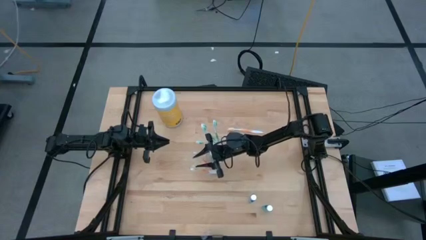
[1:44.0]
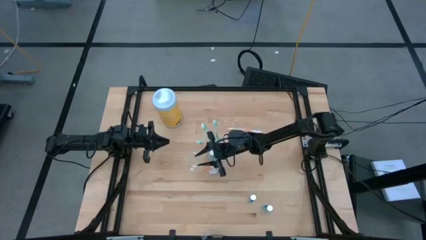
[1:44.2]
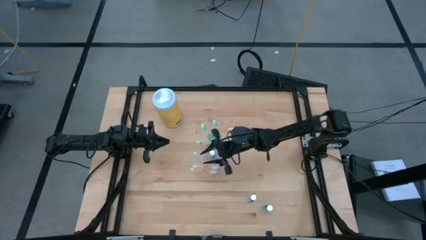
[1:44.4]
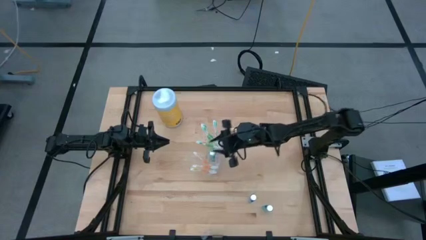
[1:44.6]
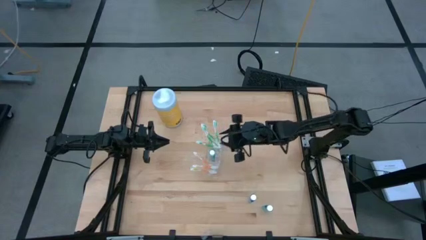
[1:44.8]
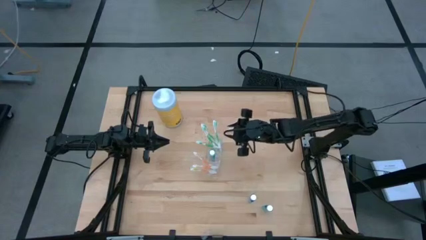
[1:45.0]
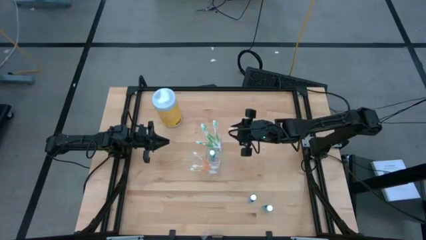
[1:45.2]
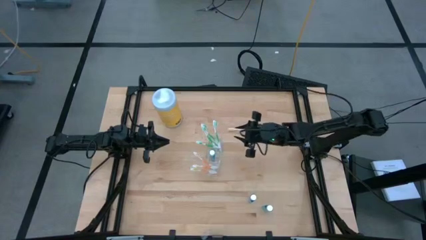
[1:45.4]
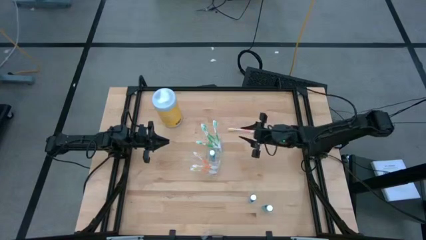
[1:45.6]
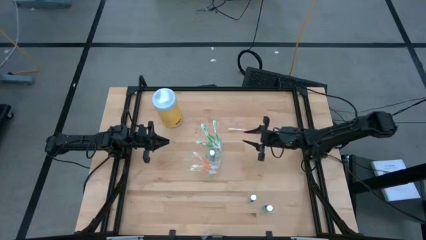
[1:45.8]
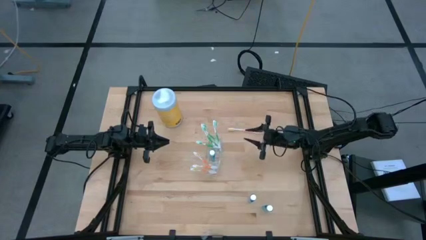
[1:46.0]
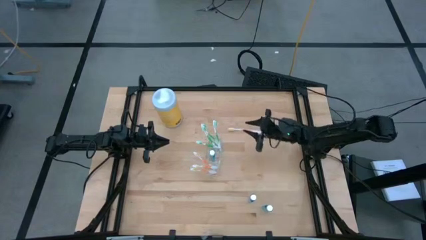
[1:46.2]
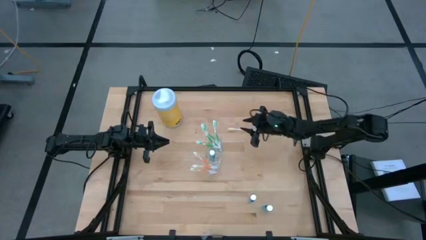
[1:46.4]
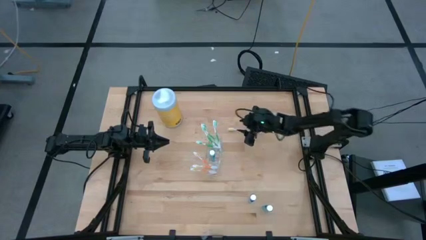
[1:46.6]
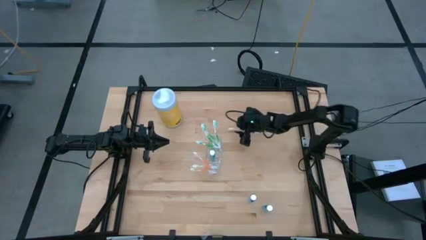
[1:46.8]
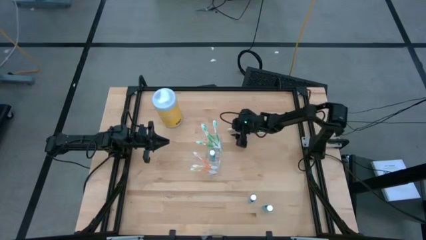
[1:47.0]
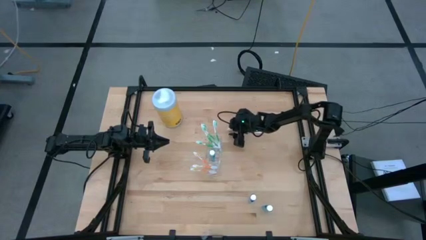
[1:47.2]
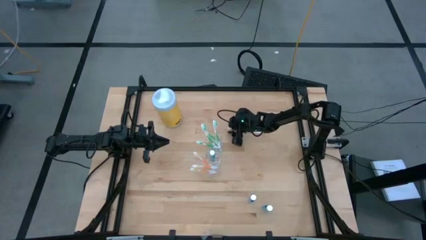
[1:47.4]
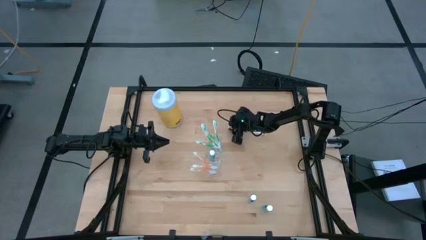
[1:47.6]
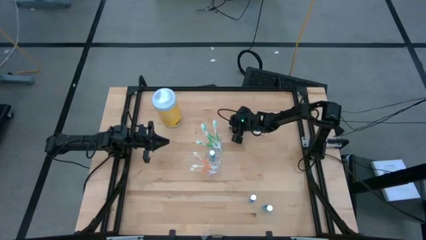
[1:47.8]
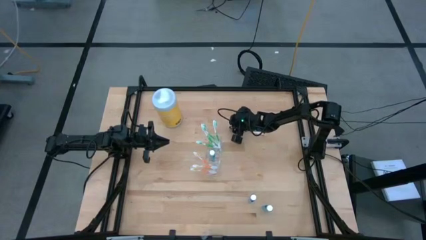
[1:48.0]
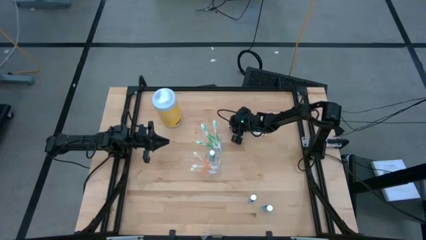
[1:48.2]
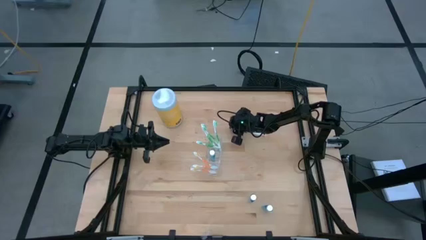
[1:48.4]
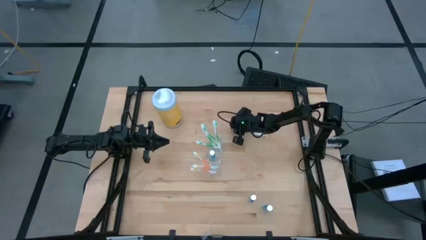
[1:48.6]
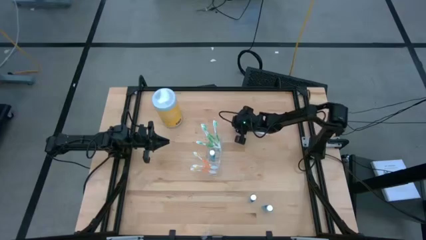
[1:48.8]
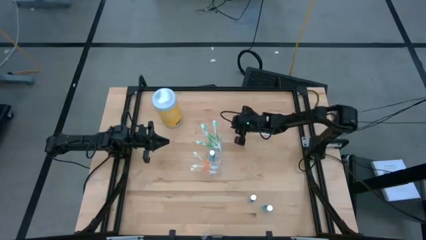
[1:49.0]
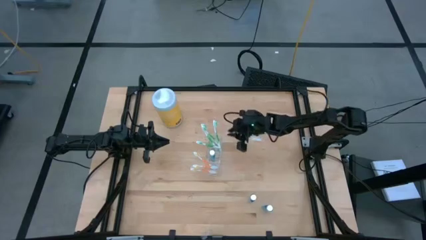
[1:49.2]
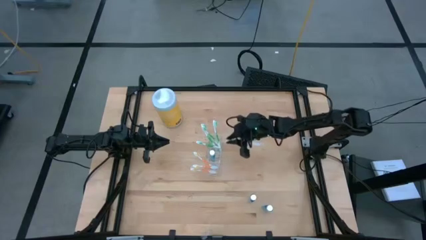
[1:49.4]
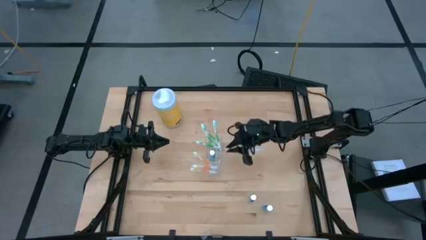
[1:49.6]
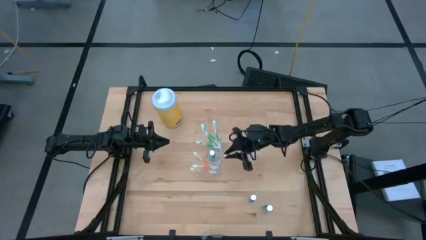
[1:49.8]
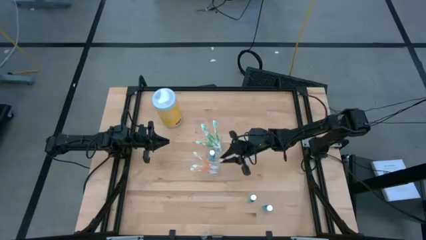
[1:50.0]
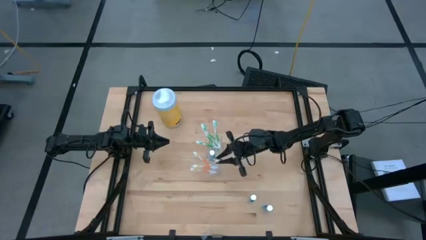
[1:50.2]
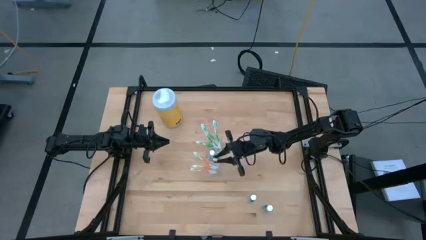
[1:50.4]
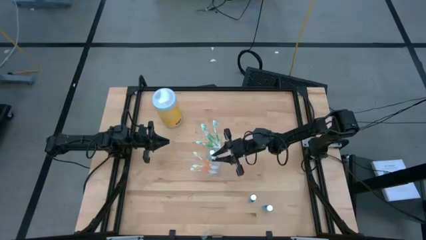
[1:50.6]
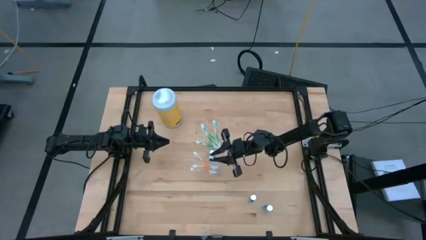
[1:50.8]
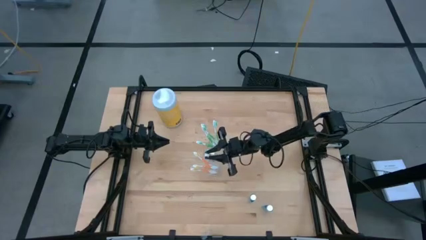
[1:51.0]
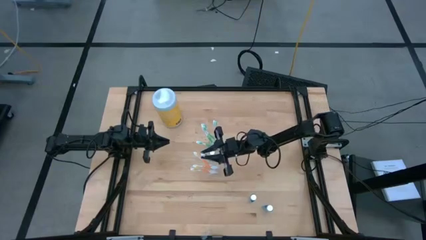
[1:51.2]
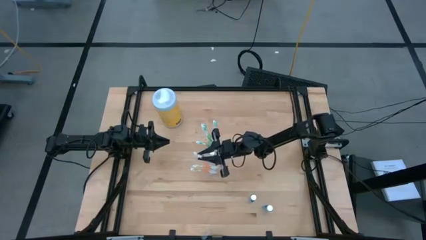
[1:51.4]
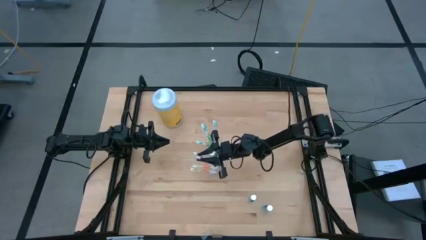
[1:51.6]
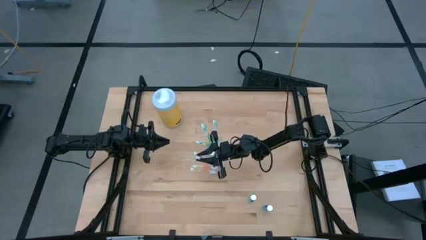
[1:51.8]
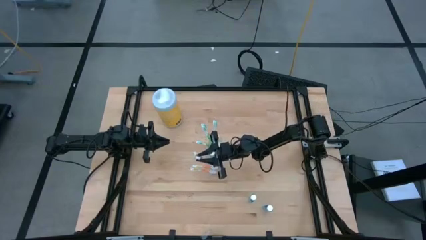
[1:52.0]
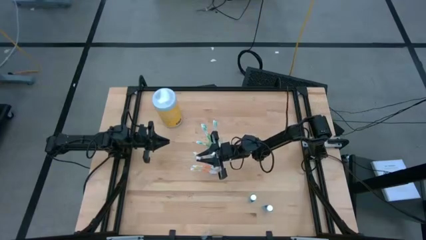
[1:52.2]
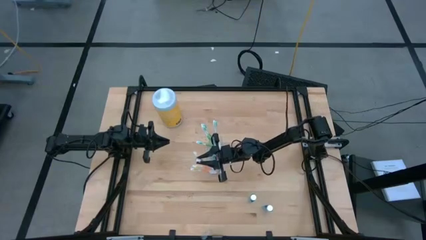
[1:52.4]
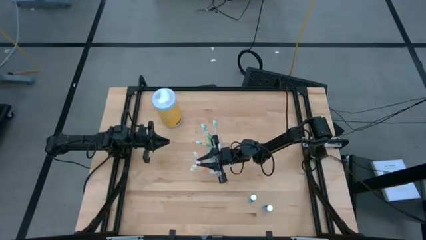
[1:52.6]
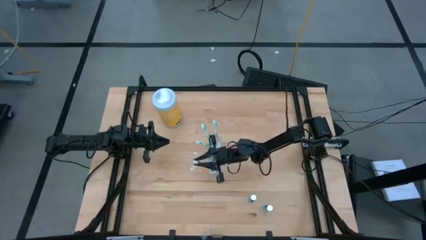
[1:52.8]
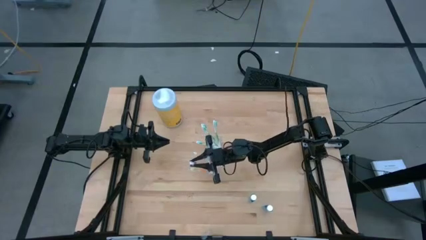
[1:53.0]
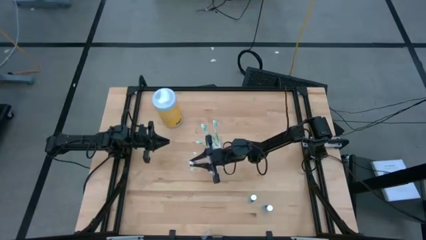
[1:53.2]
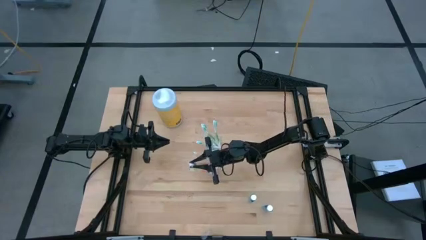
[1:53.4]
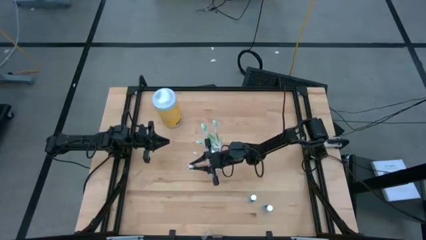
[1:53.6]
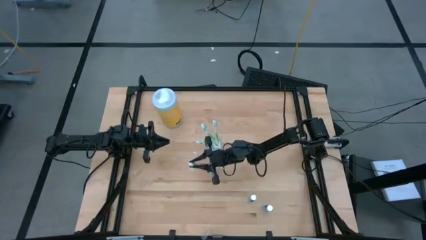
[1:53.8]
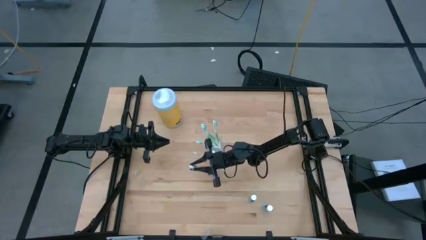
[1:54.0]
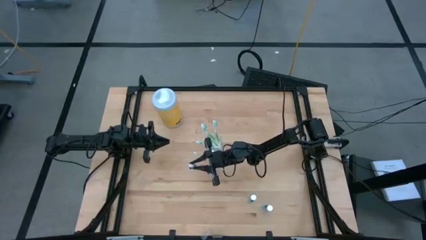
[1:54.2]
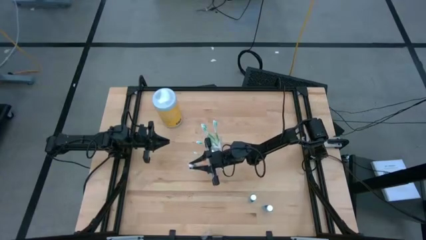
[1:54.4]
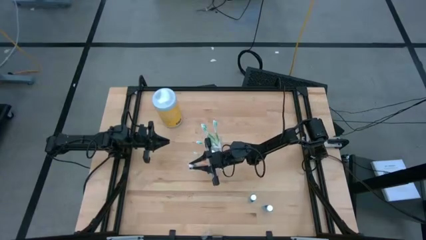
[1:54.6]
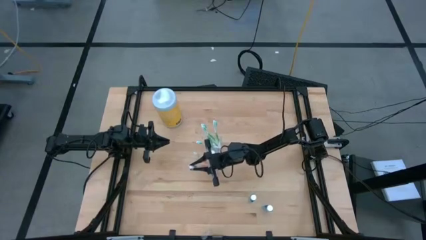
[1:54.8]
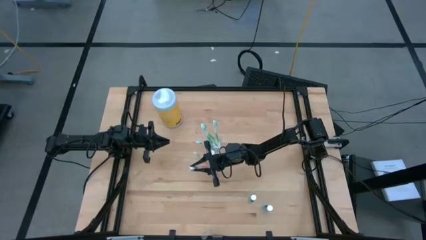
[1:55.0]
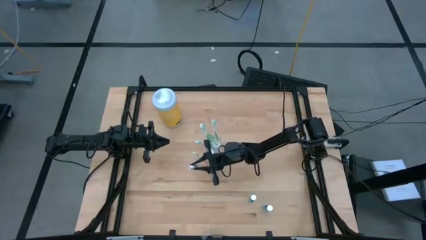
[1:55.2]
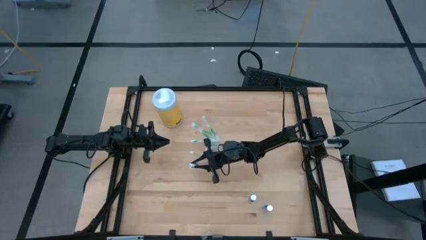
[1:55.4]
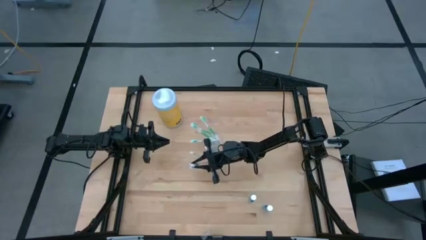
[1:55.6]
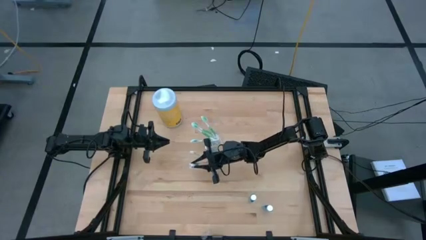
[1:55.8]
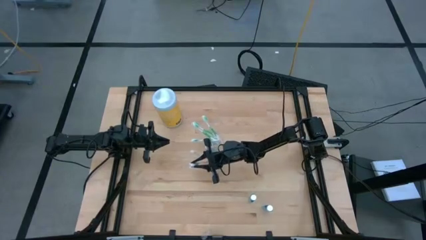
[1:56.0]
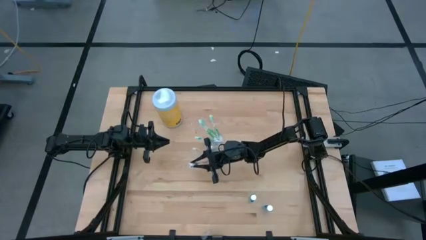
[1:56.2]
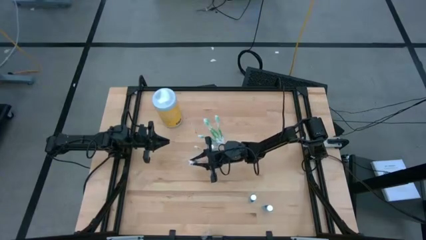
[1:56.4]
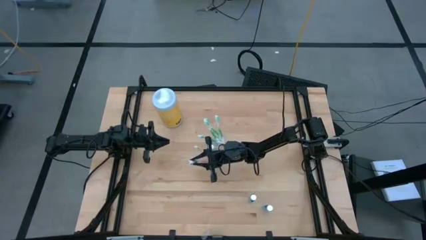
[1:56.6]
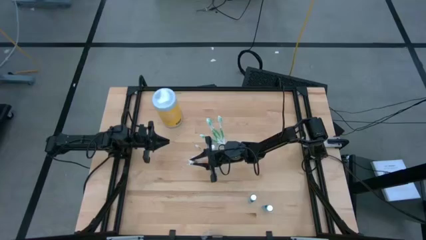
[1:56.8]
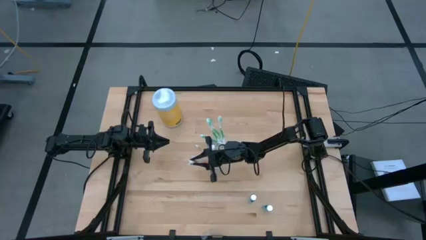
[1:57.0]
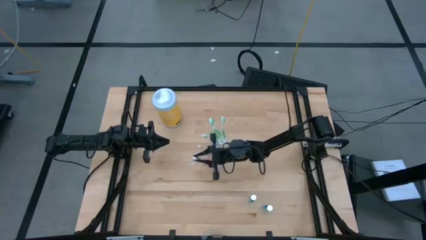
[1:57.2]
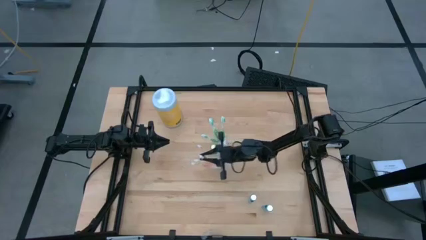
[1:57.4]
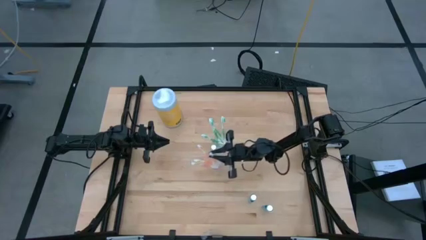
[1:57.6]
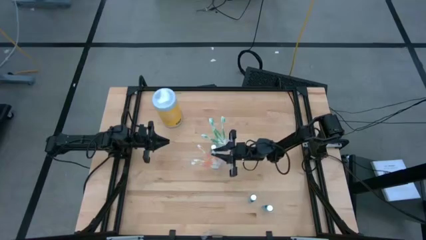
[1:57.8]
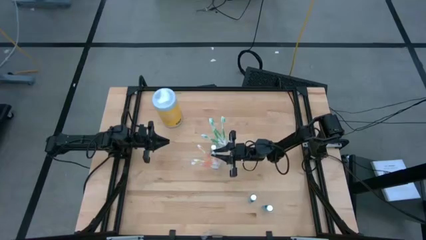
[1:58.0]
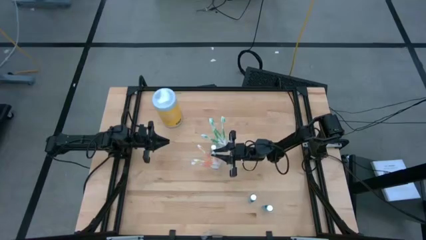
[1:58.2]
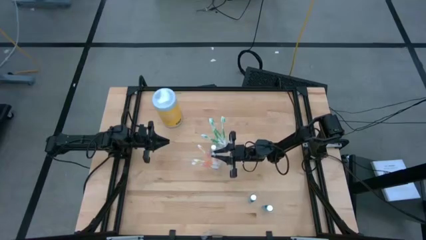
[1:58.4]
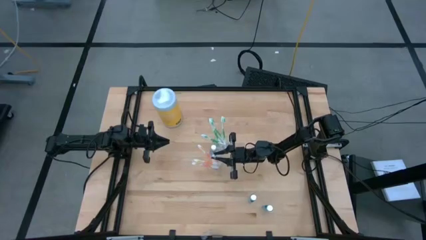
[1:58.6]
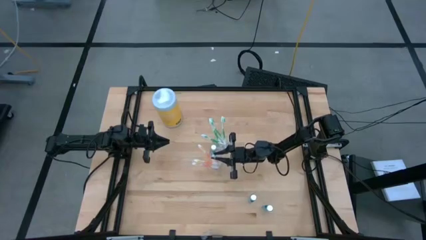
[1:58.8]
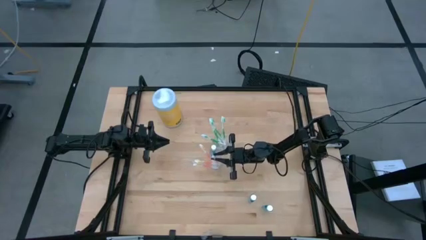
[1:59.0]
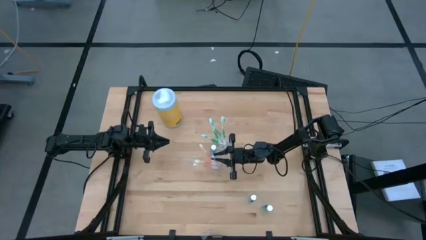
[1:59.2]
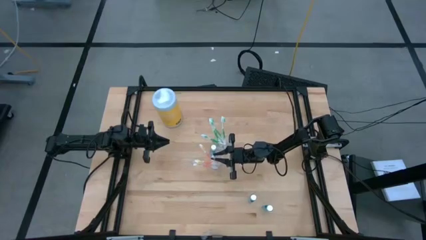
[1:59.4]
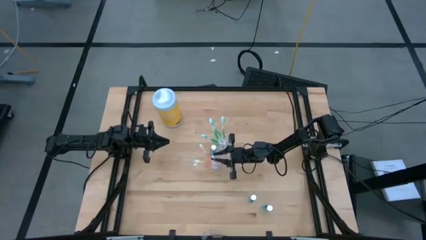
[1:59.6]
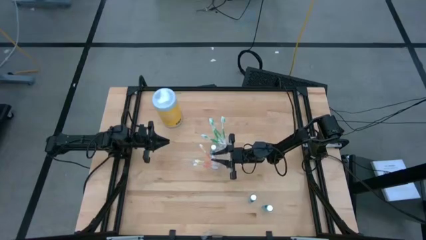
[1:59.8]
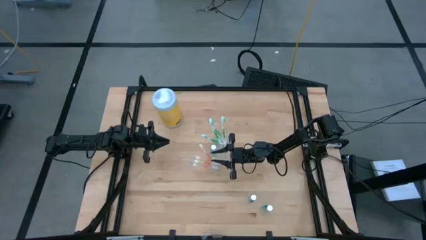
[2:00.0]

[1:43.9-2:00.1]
Task: Pick & Place toothbrushing station
Put the orange toothbrush into the transparent organizer
